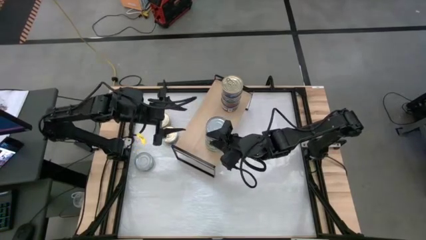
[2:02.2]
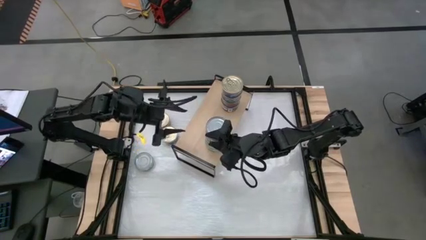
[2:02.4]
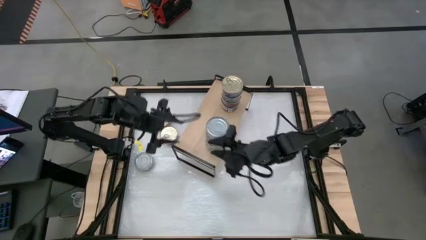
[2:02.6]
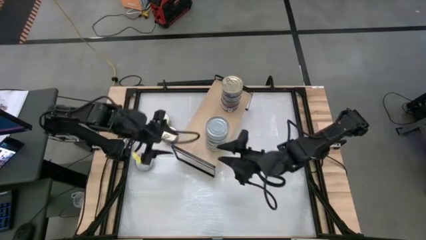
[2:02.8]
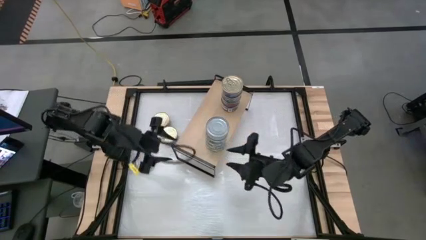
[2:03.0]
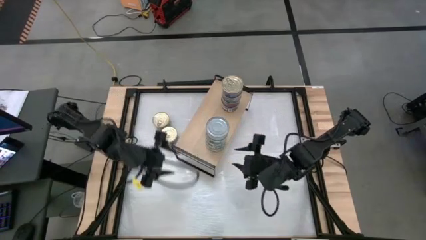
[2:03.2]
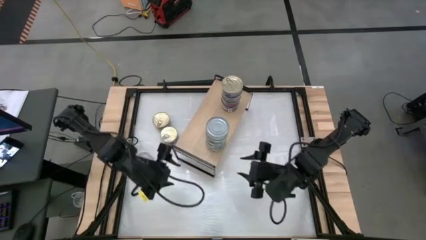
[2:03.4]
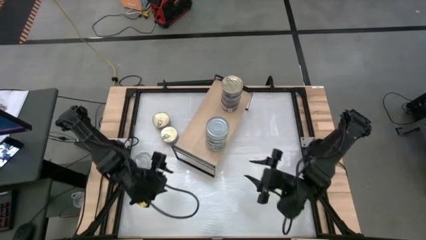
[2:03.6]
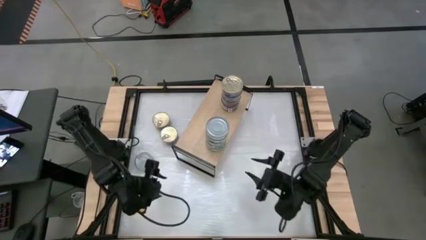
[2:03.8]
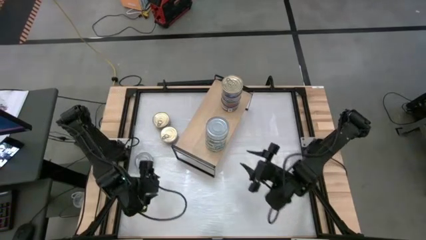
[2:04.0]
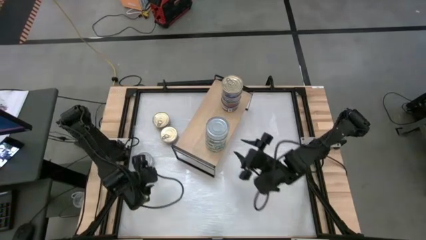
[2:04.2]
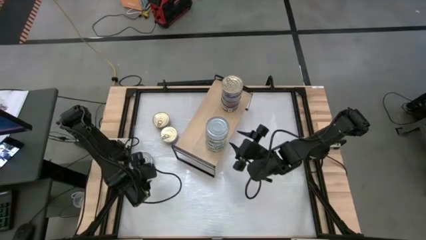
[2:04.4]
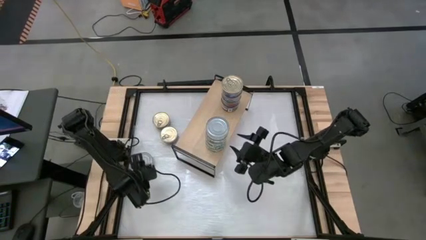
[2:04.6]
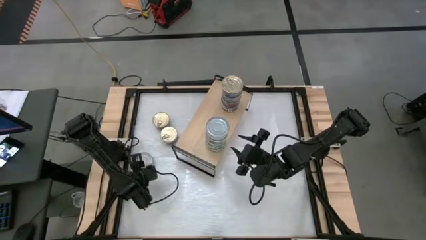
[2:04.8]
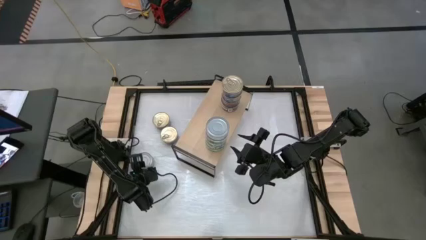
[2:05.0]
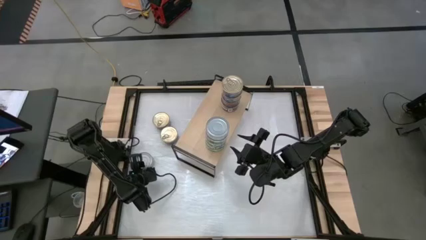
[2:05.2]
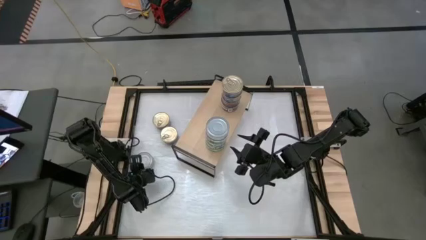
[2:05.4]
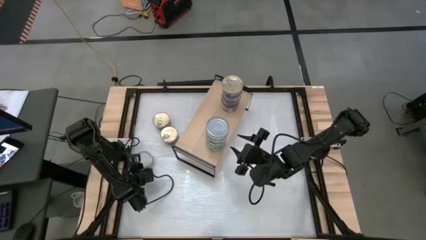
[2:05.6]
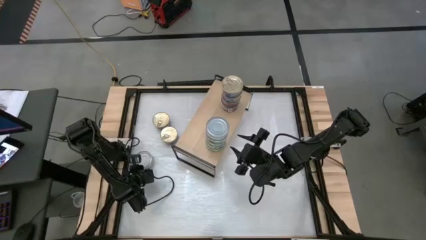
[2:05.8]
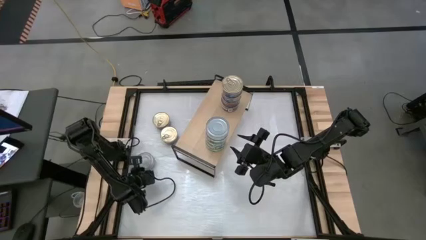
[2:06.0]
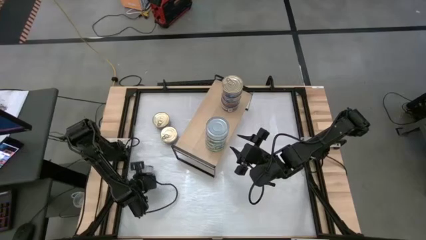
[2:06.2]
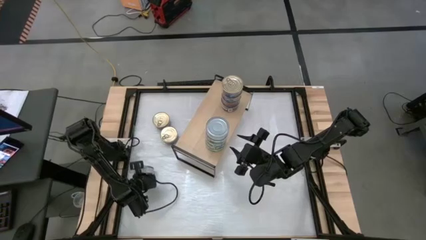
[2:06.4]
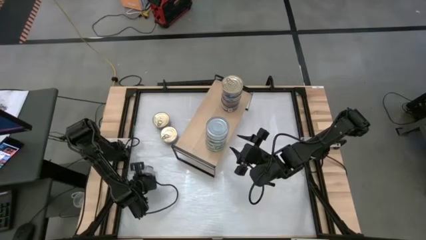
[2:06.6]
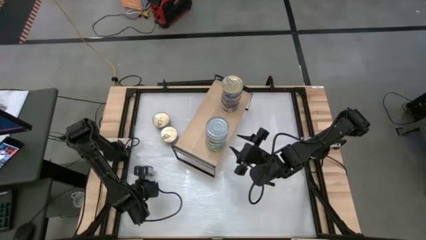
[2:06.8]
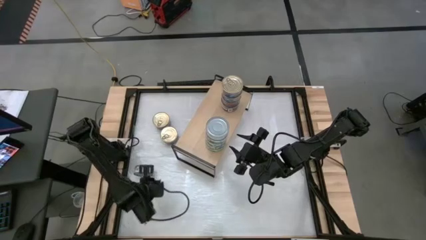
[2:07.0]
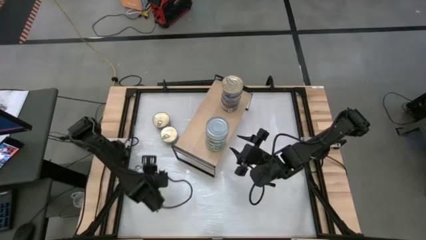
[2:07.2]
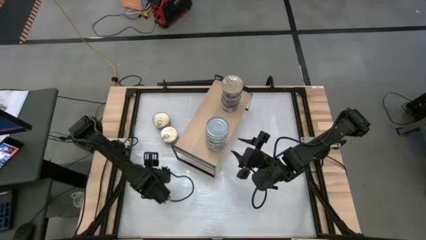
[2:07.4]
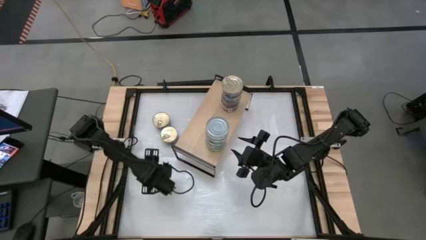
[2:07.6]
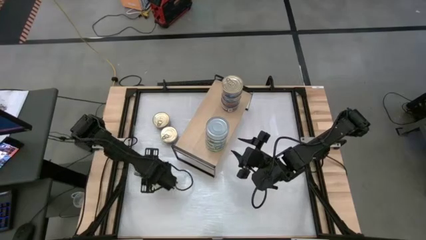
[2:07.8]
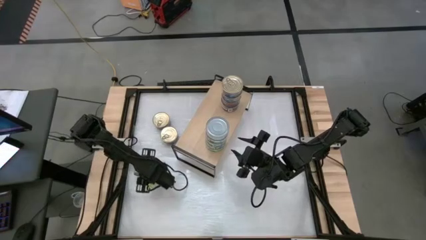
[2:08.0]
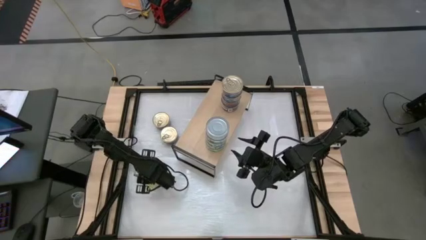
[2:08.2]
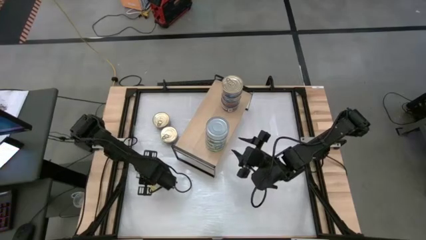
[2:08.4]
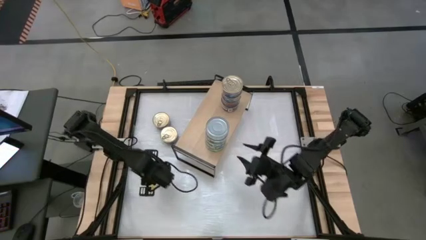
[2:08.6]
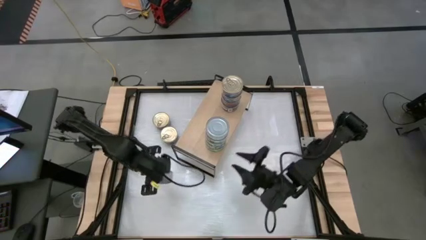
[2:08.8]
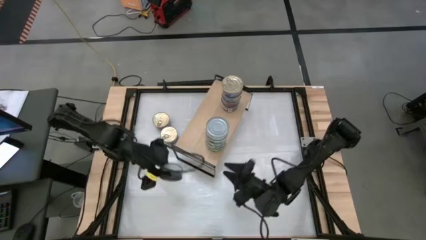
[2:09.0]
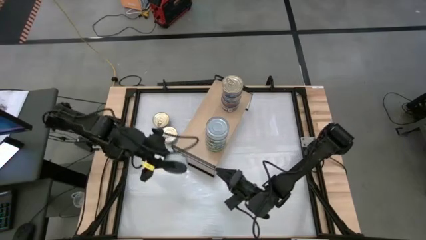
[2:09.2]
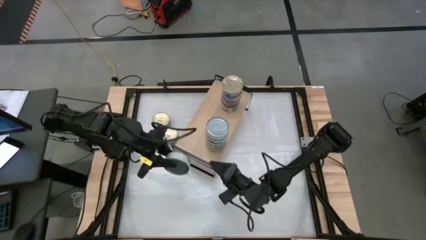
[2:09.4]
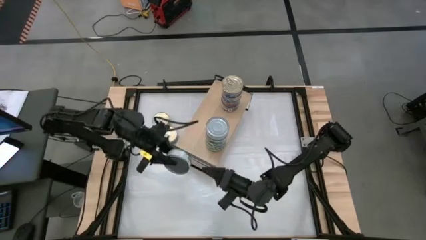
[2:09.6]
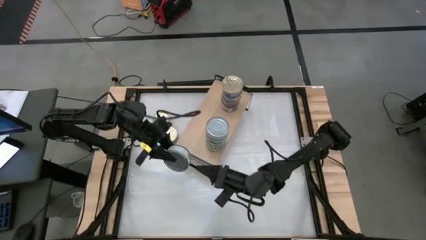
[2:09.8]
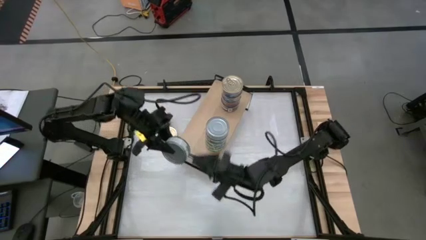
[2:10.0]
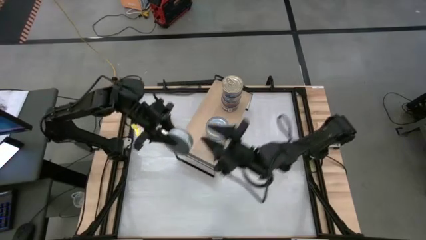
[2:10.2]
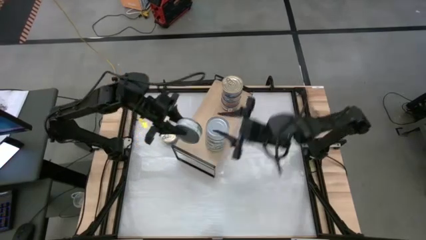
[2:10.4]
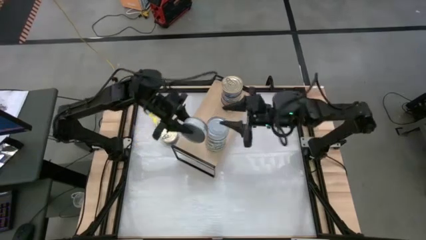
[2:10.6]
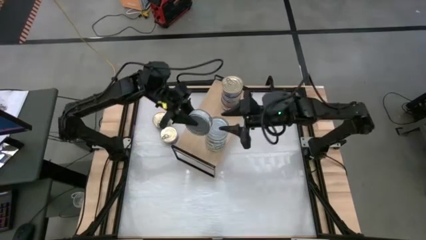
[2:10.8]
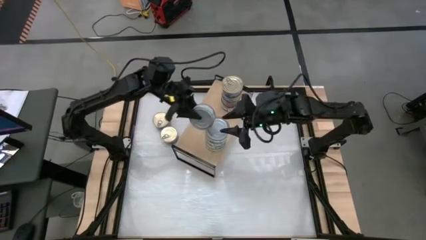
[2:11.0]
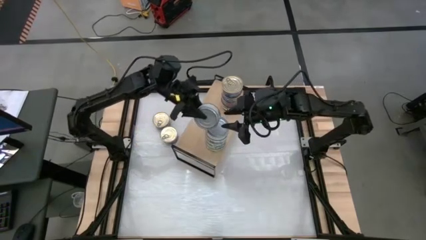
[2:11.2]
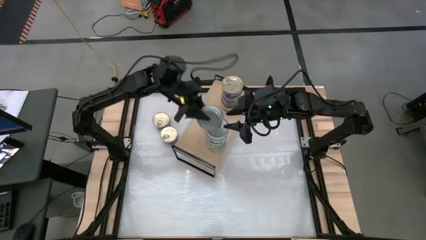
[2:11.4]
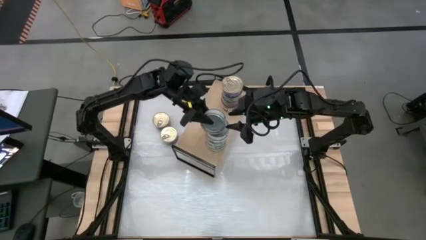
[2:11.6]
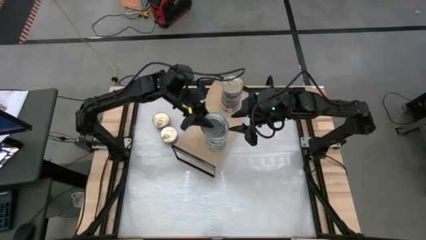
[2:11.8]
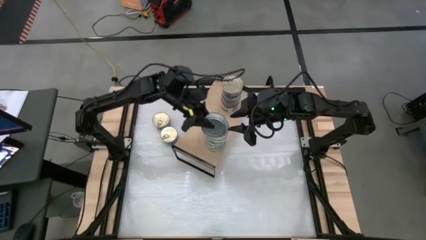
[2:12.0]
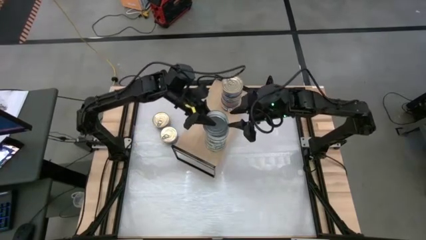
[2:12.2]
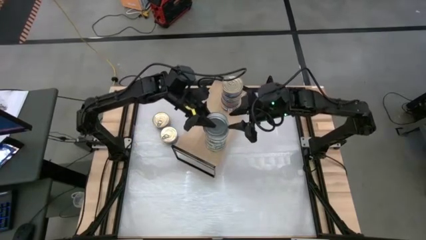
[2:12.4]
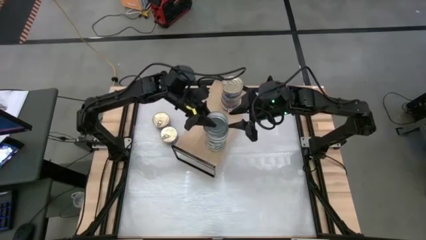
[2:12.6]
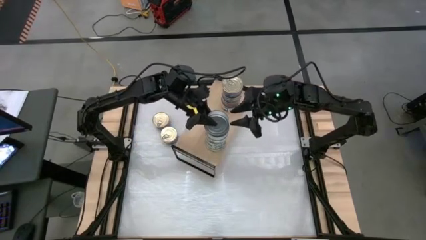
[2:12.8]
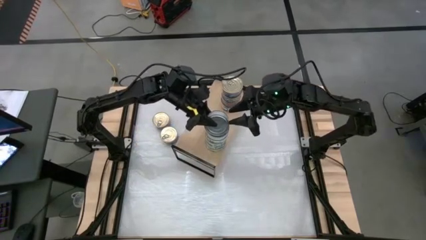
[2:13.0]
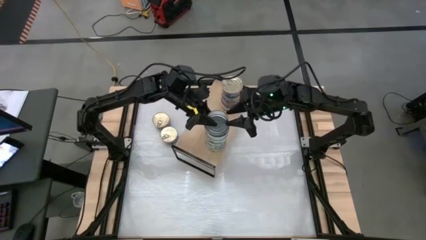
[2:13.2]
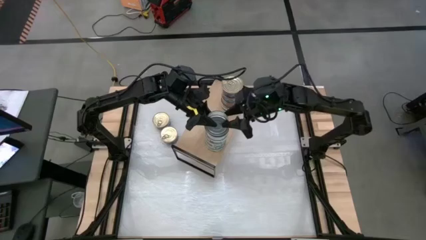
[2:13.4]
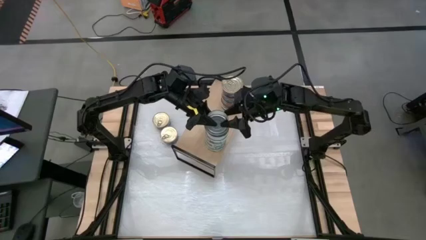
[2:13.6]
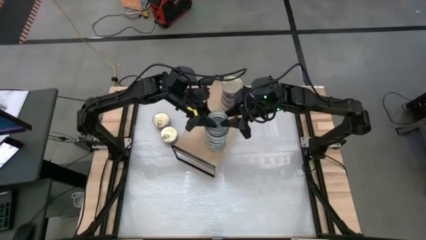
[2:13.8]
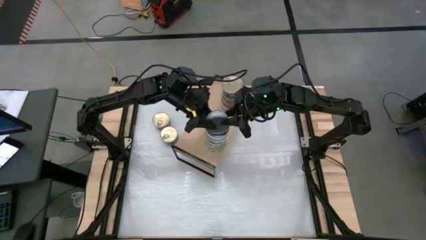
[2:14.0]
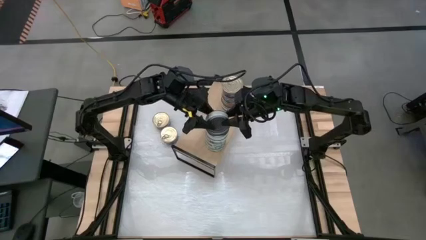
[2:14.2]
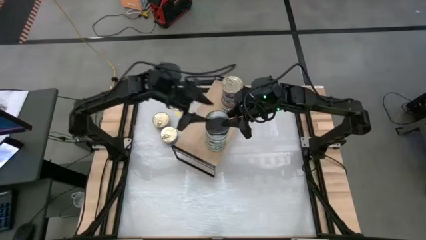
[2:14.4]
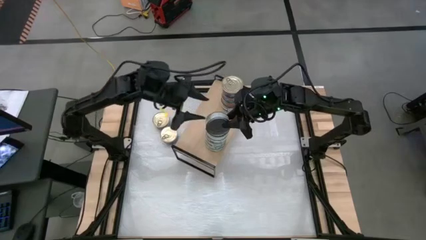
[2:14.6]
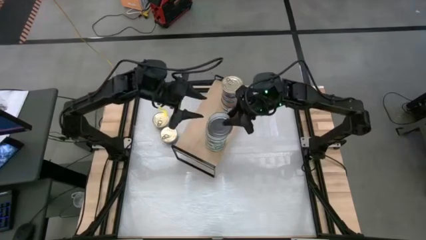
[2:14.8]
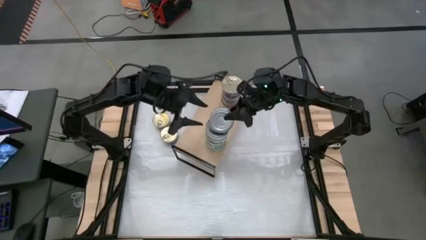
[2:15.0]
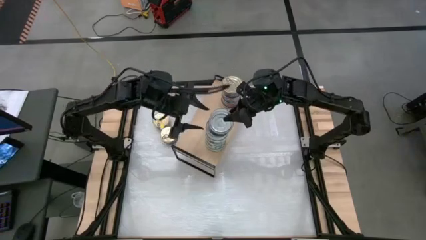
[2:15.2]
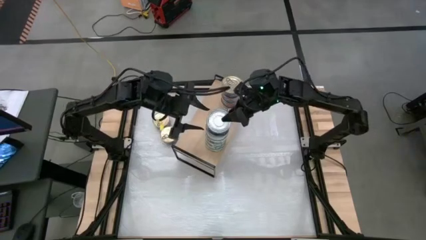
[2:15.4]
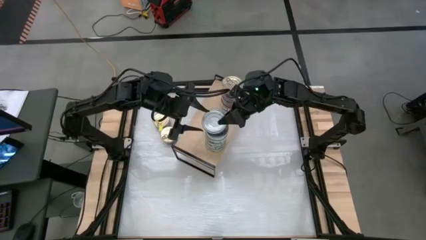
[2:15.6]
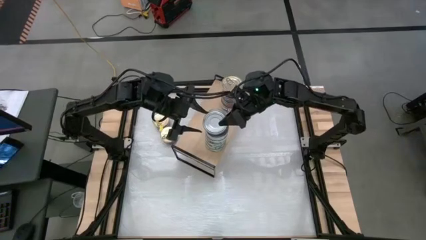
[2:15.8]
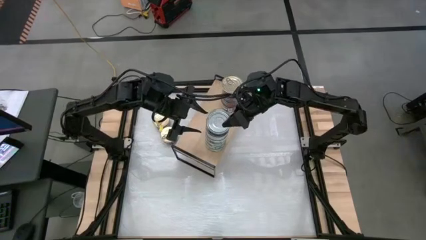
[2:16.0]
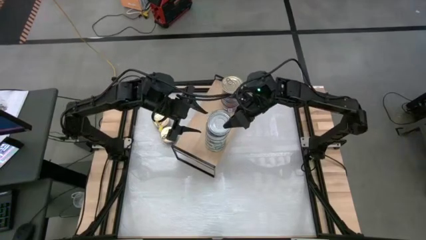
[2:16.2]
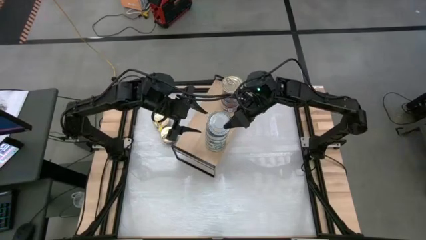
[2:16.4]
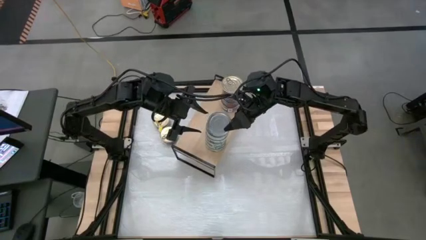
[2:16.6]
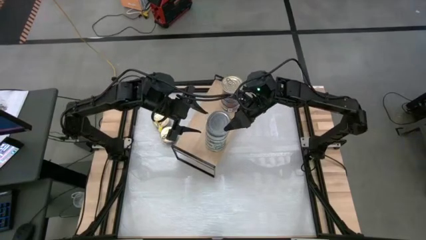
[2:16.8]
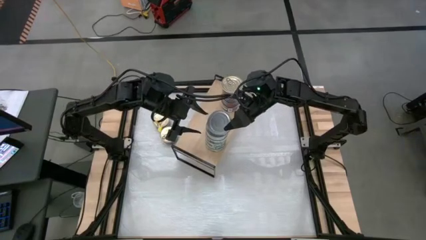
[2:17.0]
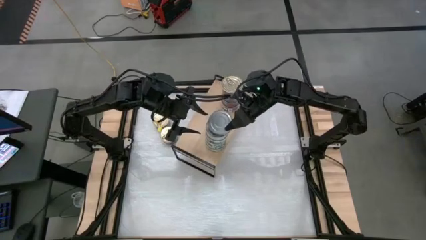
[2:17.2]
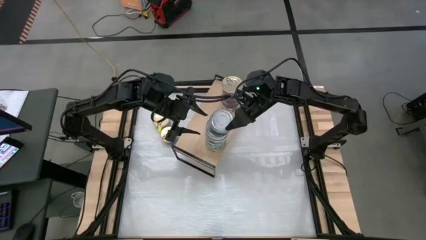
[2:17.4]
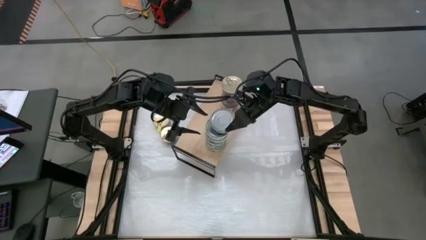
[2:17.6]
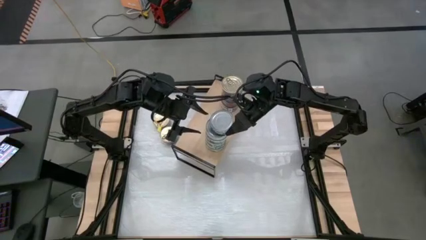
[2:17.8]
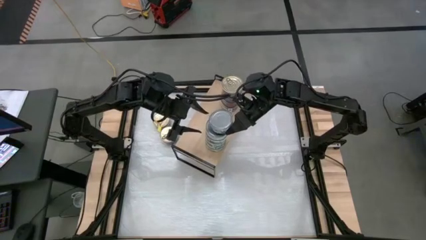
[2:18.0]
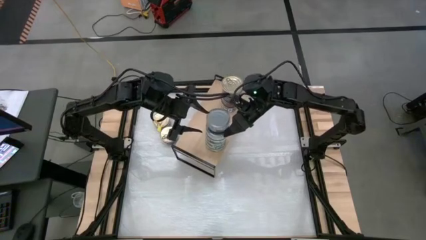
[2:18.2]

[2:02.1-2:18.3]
Task: Stack canned seafood by type on shelf
Stack the green tuna can on top of the other green tuna can
